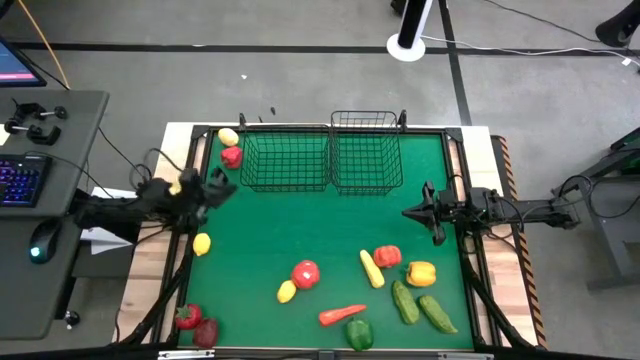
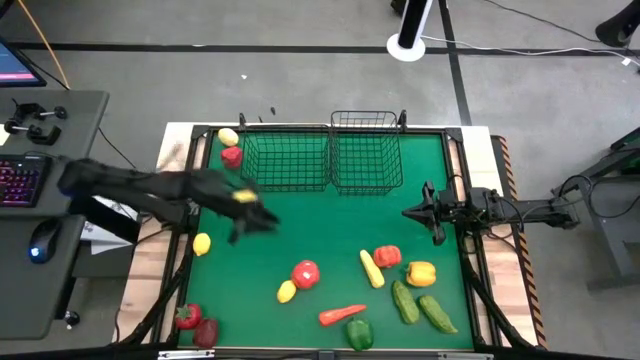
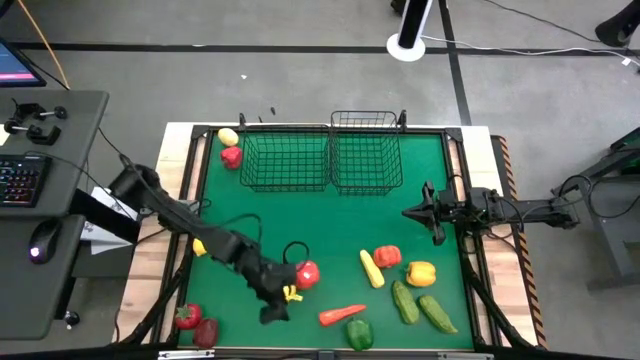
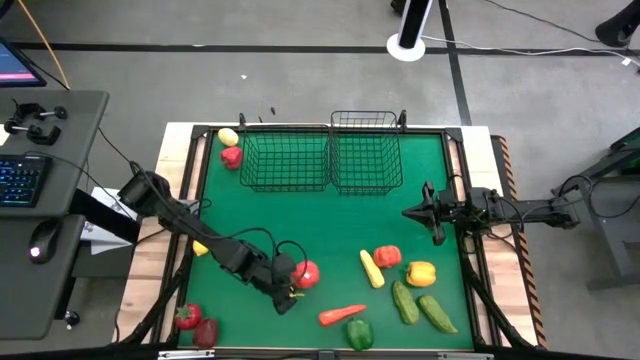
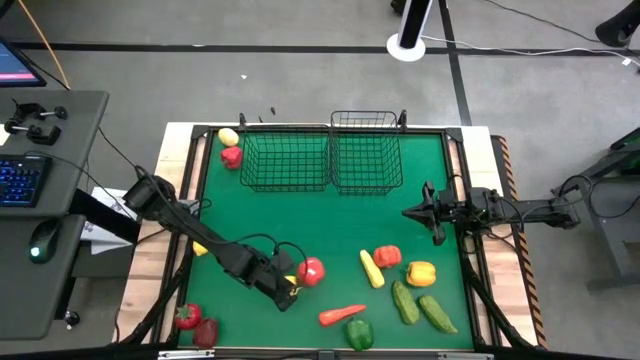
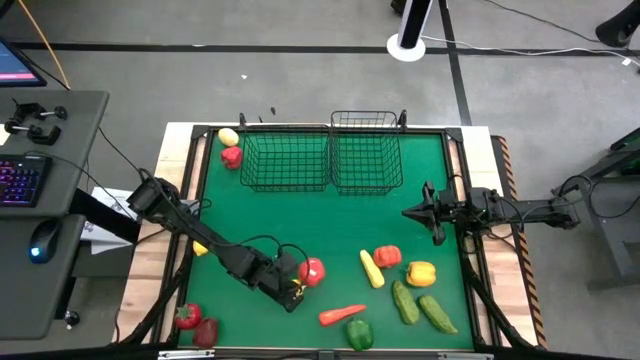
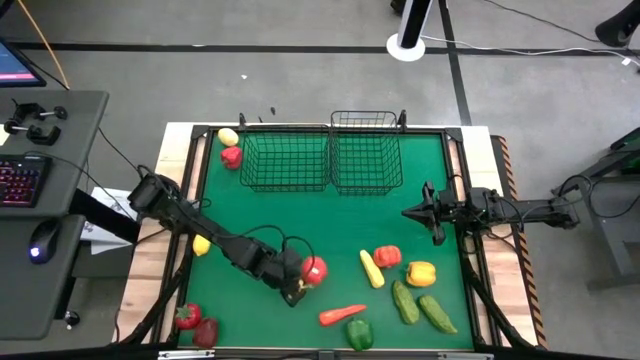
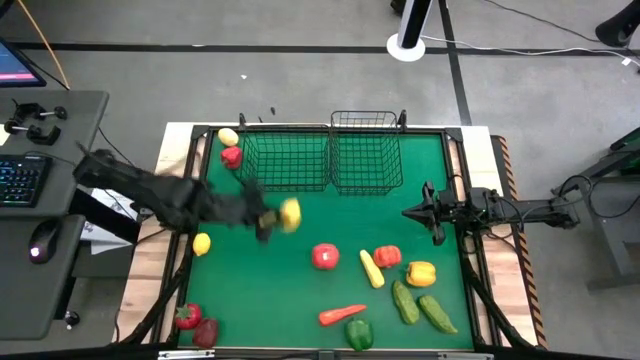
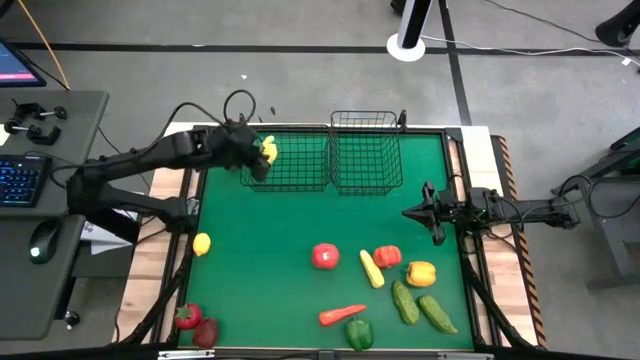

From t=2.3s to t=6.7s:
Task: Sort produce into baskets
Put the bottom yellow lemon into the left wire basket

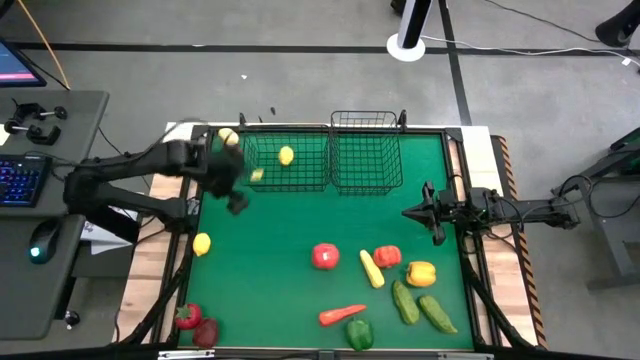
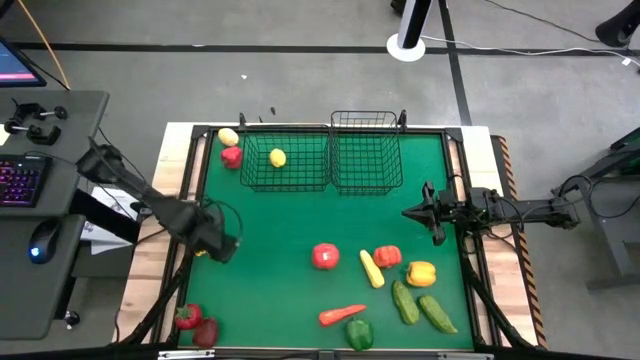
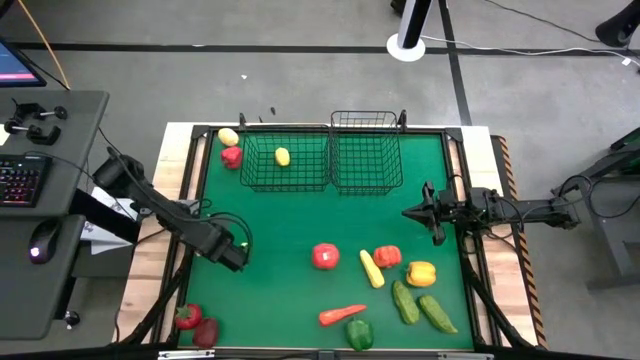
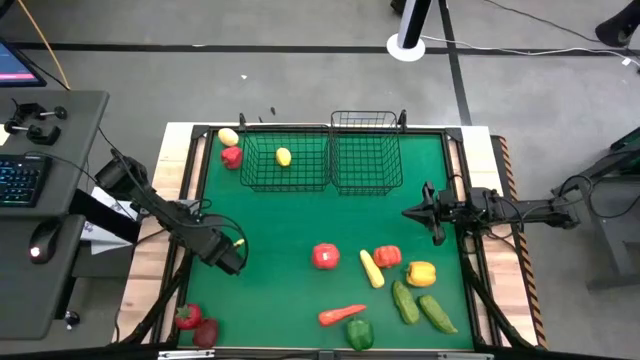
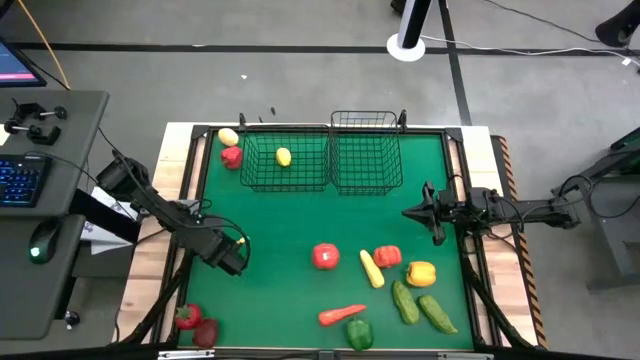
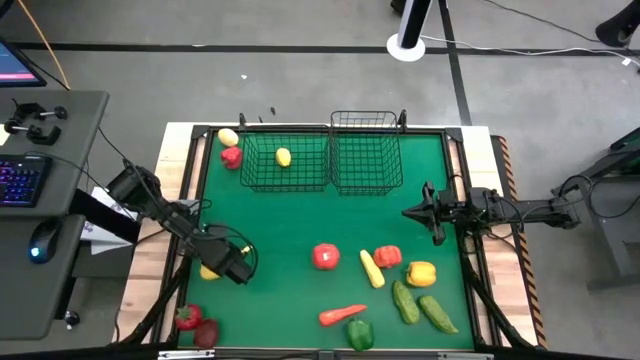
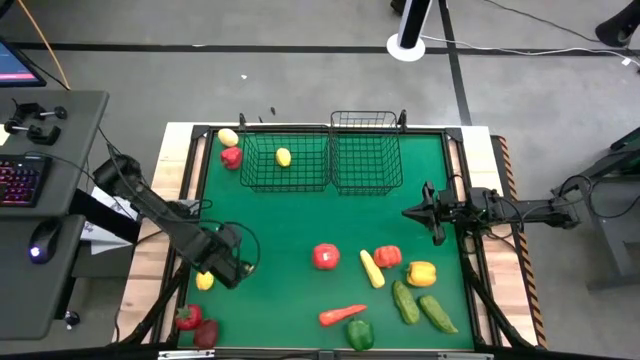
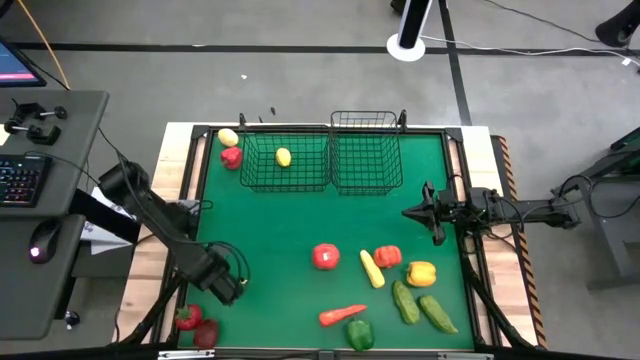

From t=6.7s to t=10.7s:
Put the bottom yellow lemon into the left wire basket

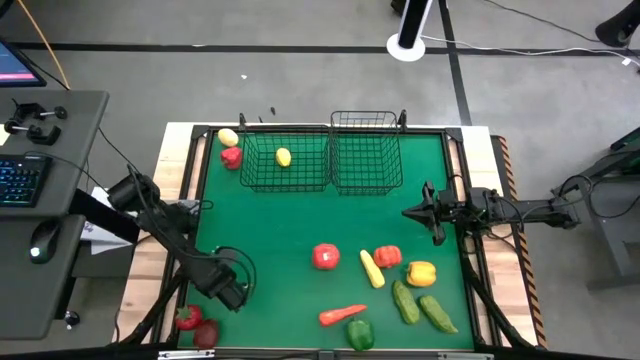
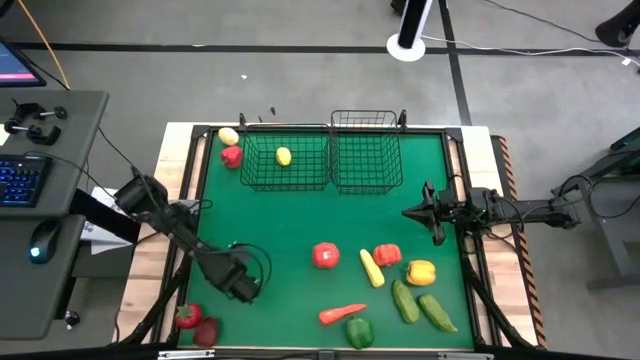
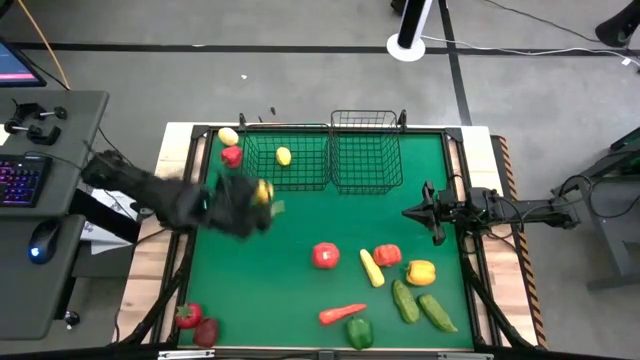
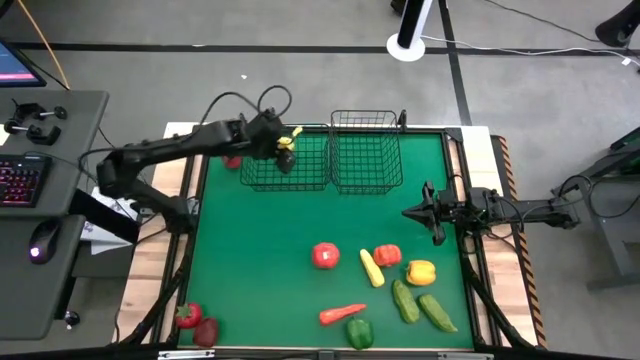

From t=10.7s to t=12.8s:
Put the bottom yellow lemon into the left wire basket

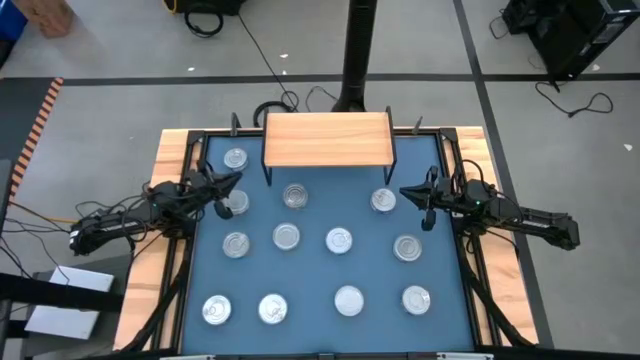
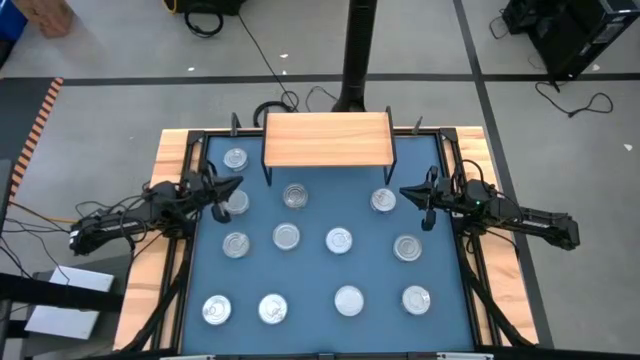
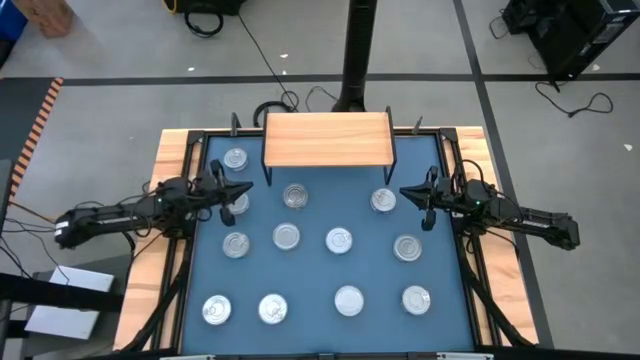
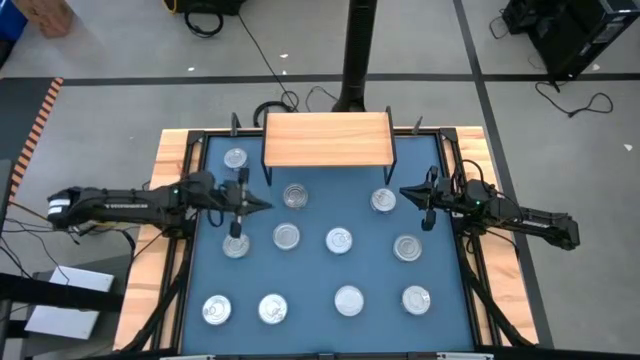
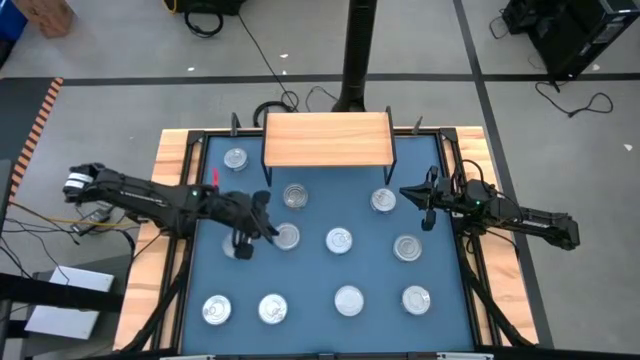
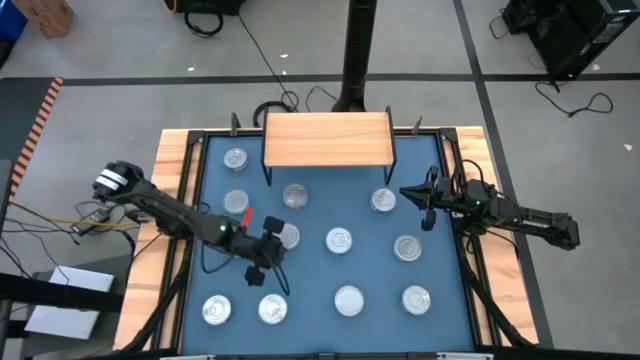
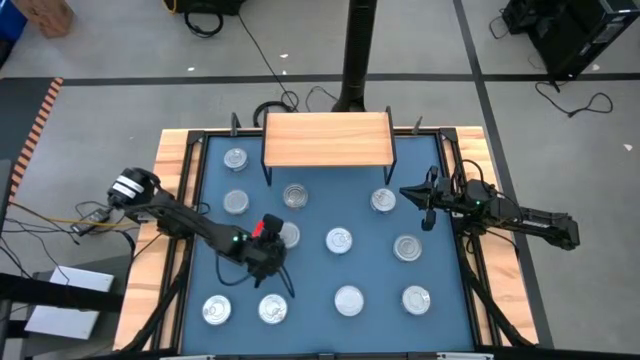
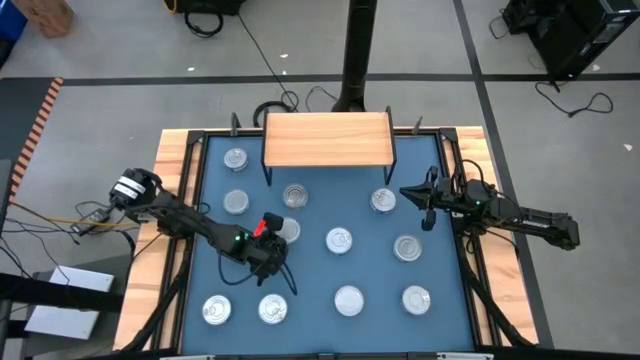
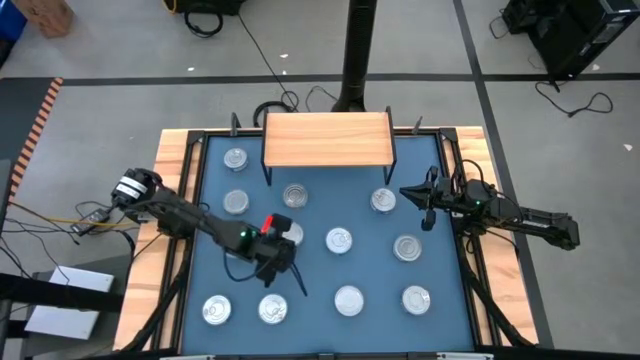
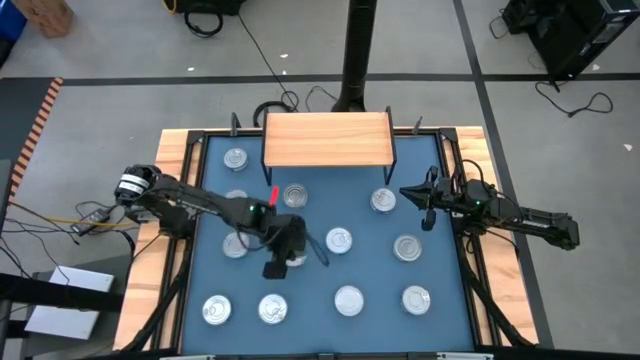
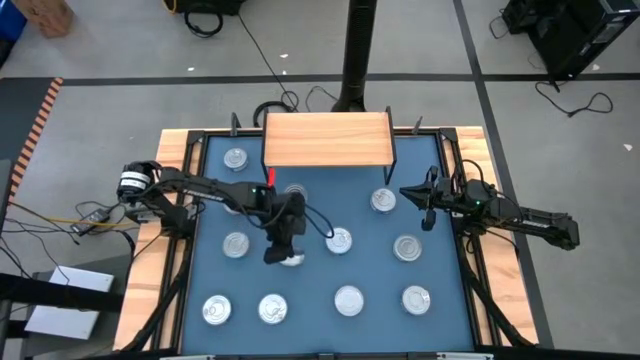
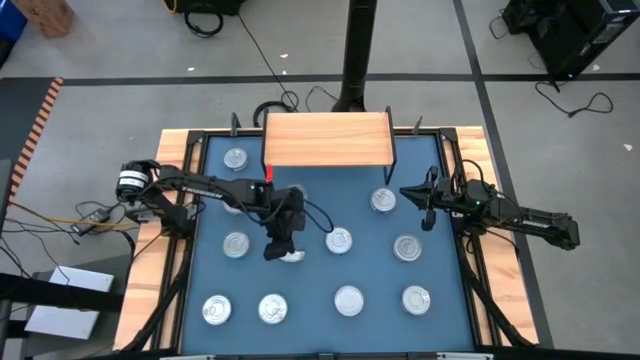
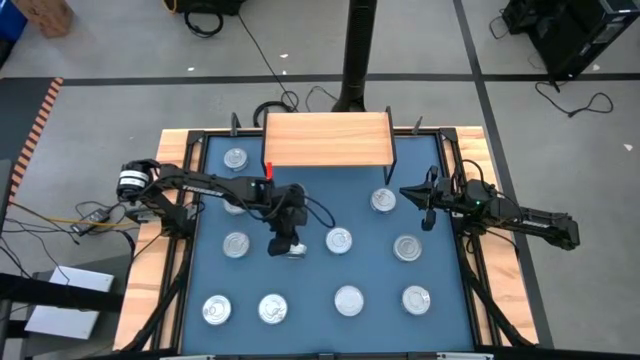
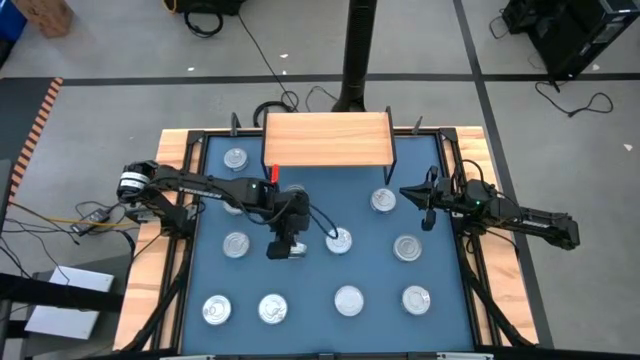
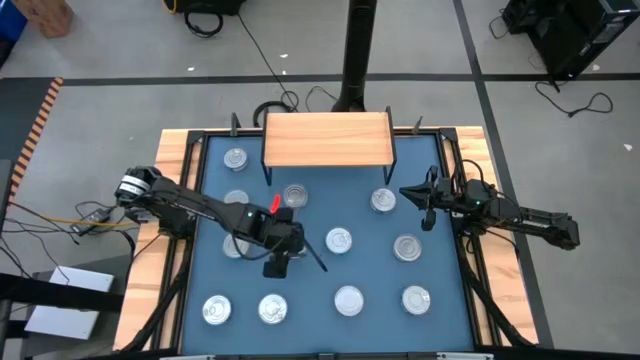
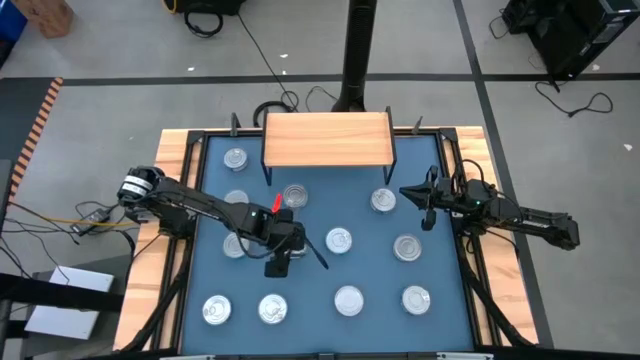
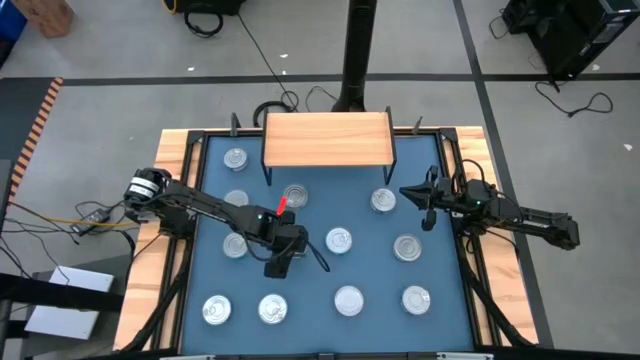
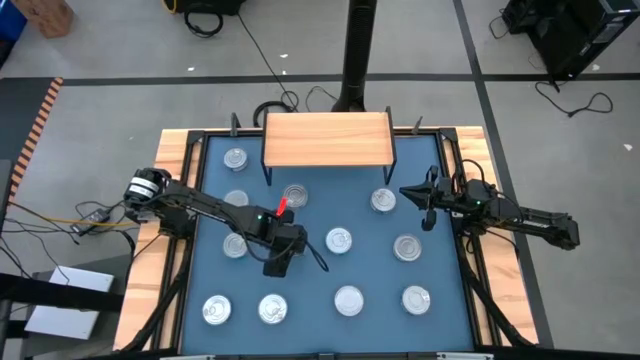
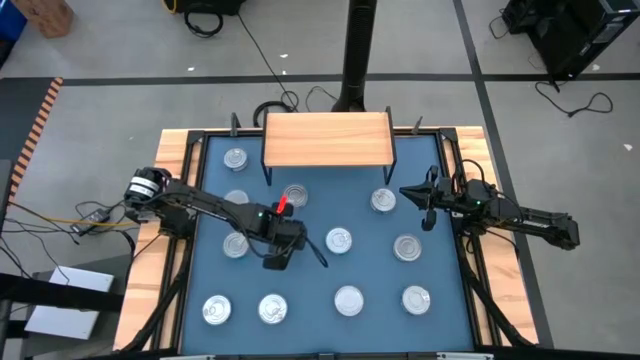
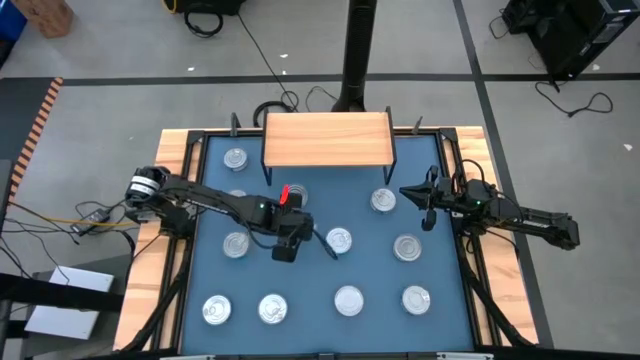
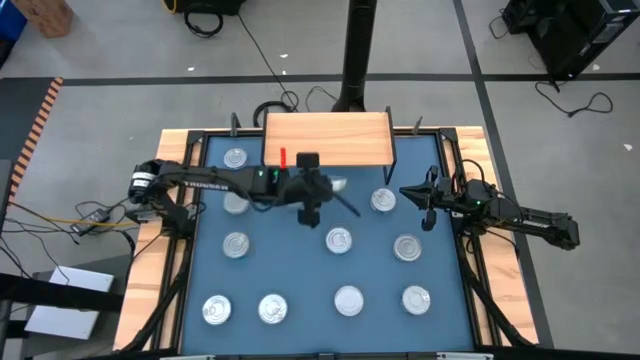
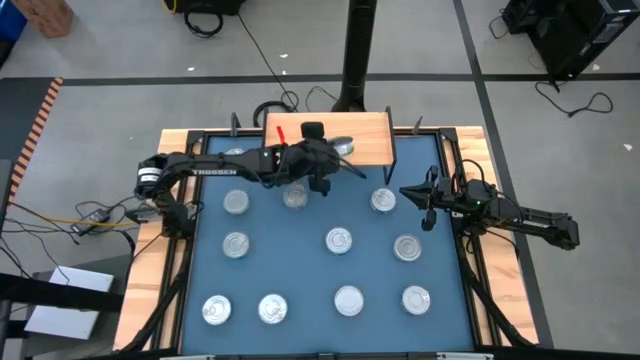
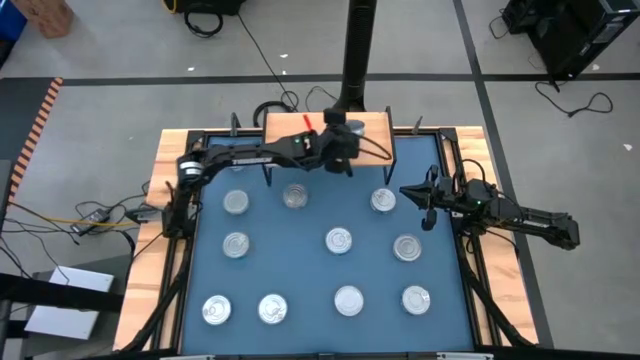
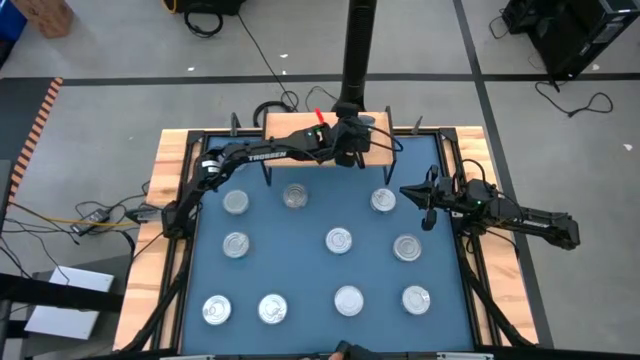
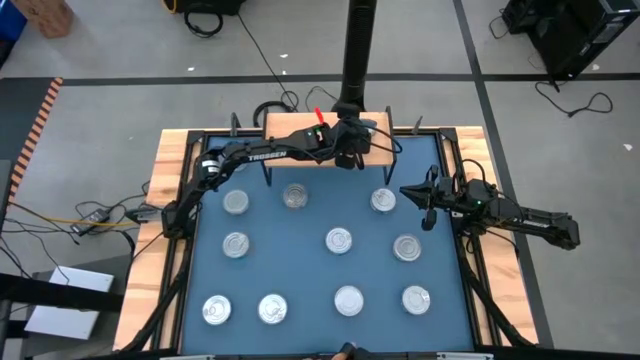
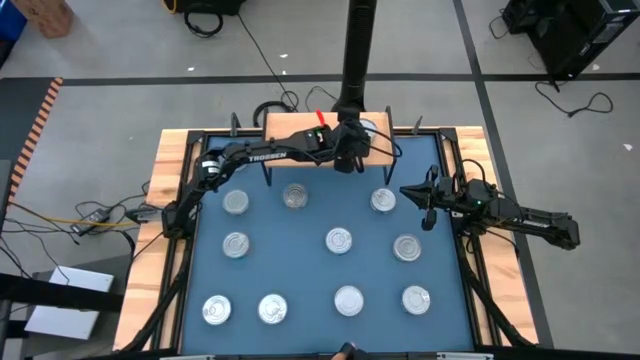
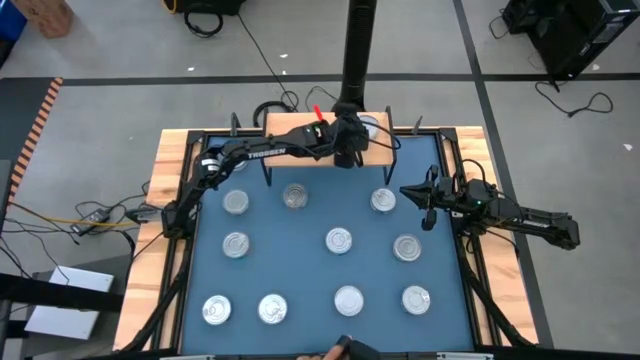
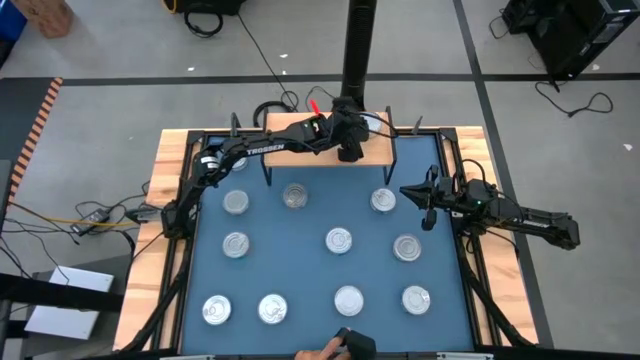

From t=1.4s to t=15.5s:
Task: Stack canned seafood by type on shelf
Put the green tuna can on the shelf
